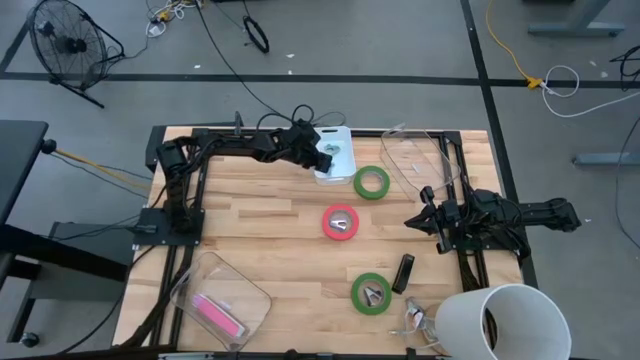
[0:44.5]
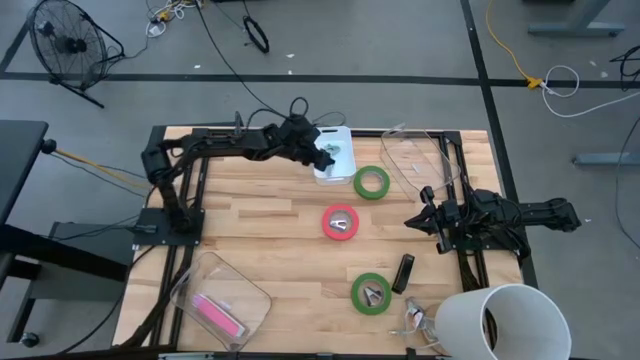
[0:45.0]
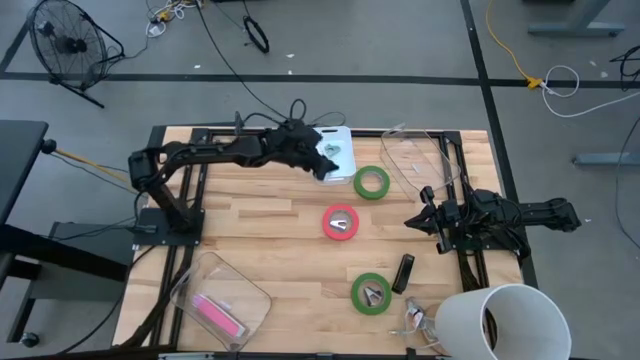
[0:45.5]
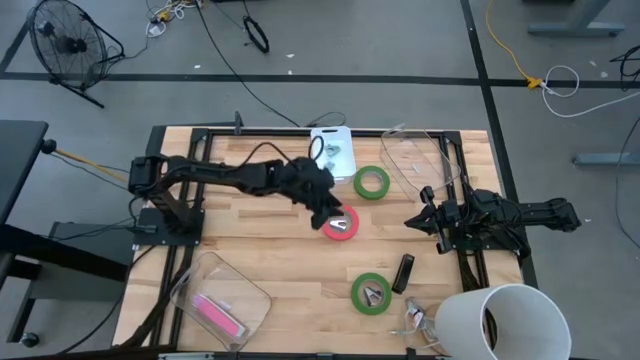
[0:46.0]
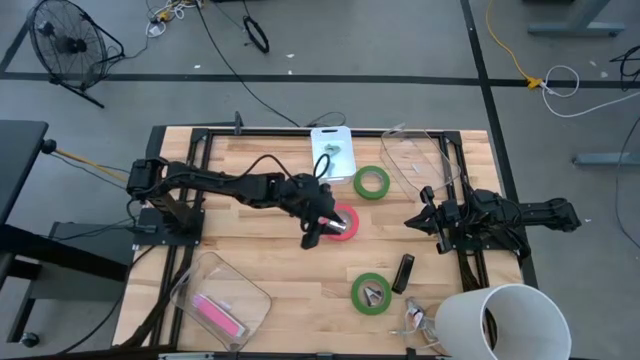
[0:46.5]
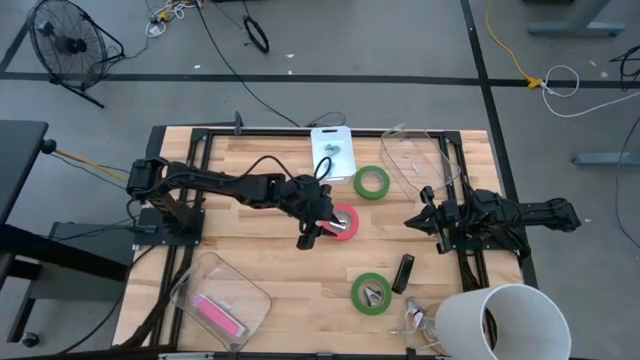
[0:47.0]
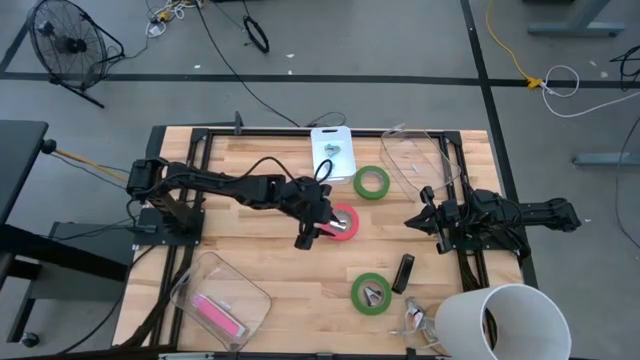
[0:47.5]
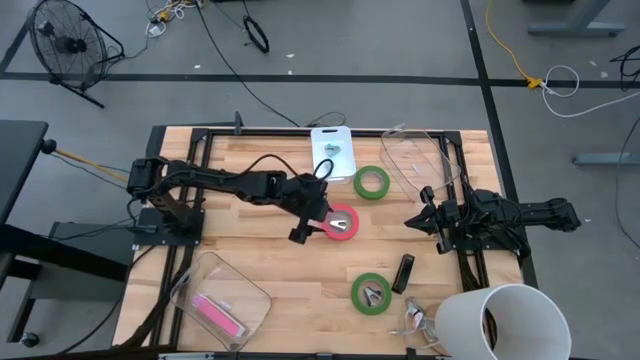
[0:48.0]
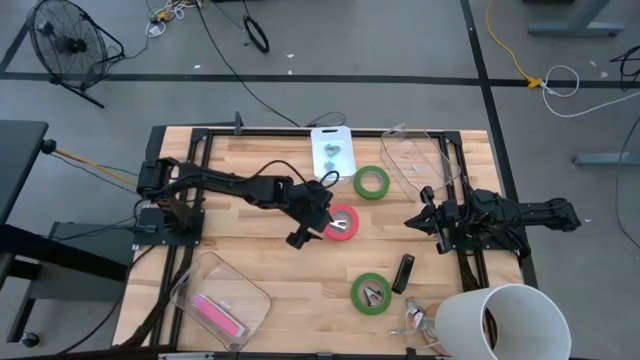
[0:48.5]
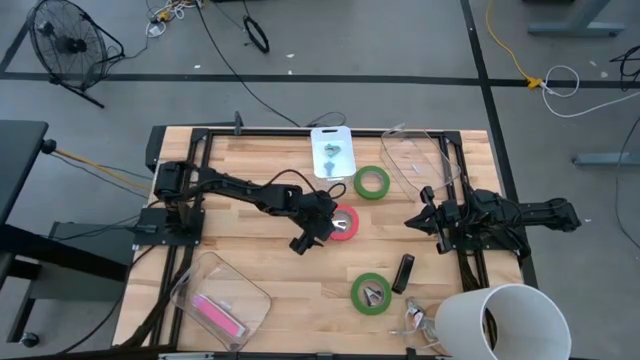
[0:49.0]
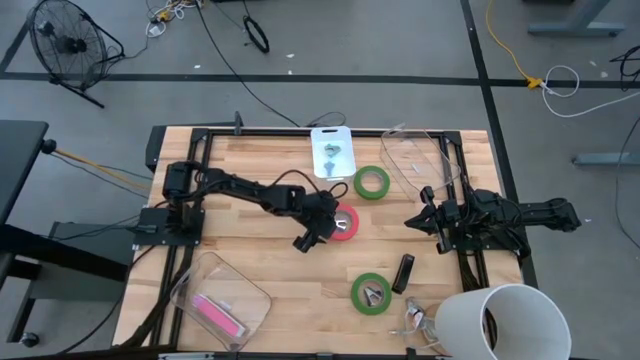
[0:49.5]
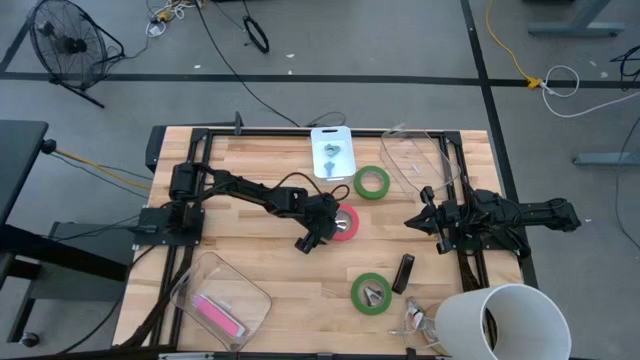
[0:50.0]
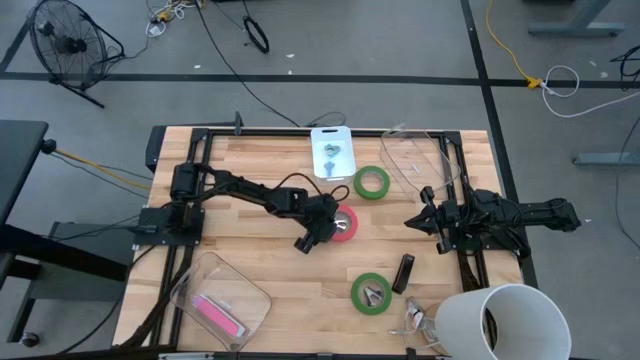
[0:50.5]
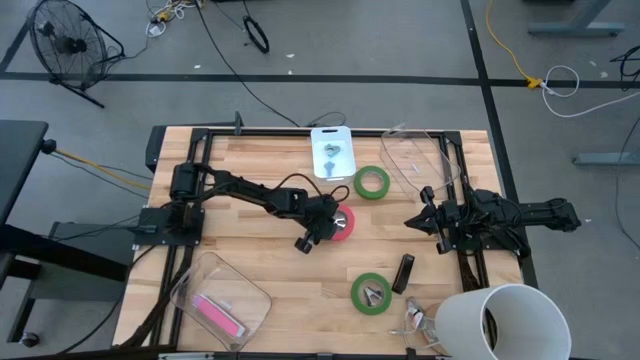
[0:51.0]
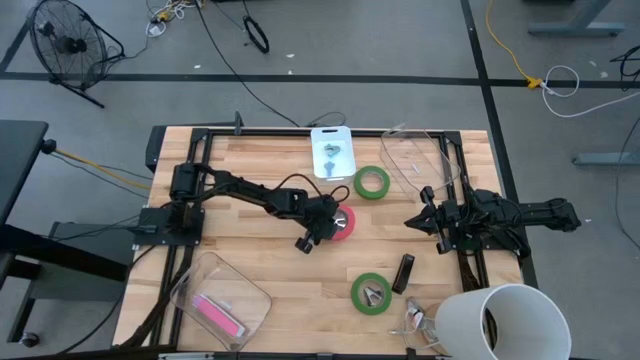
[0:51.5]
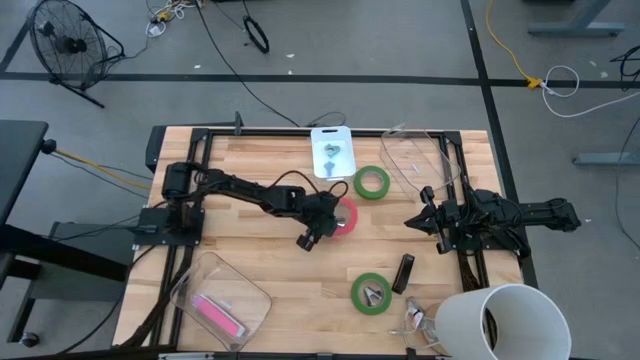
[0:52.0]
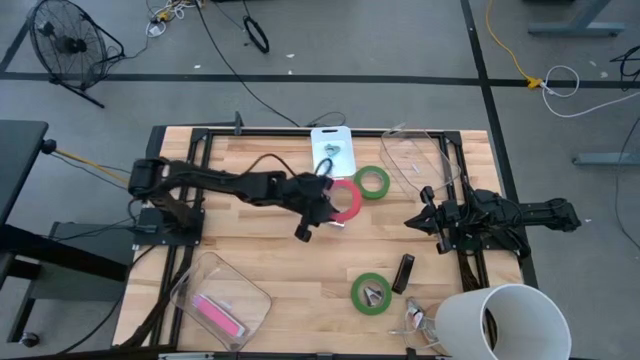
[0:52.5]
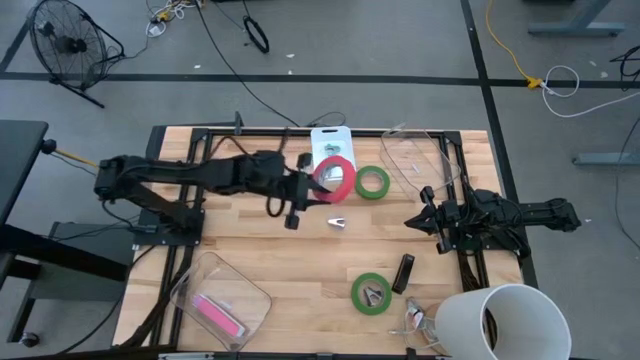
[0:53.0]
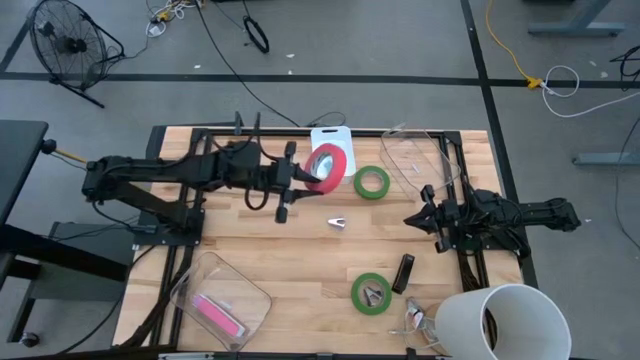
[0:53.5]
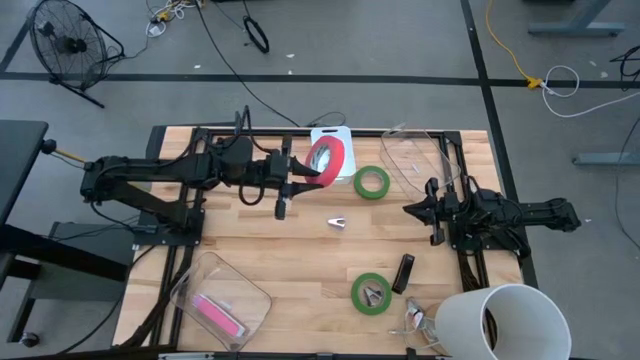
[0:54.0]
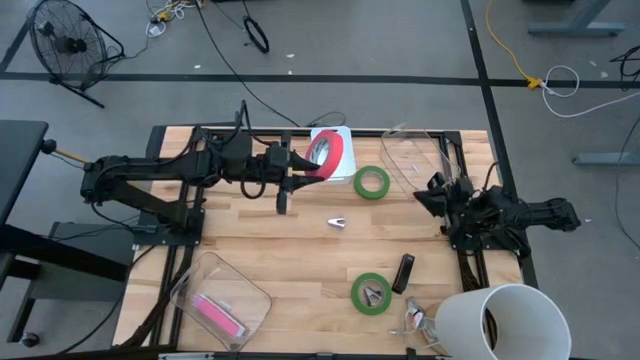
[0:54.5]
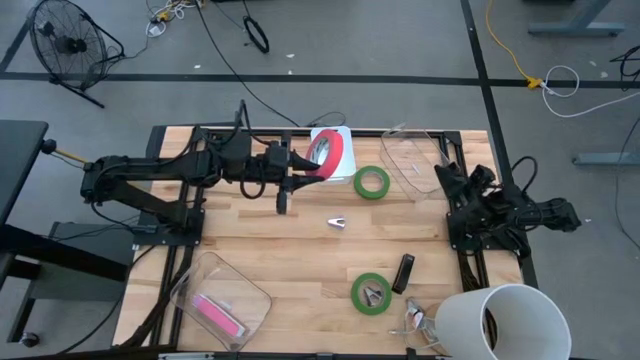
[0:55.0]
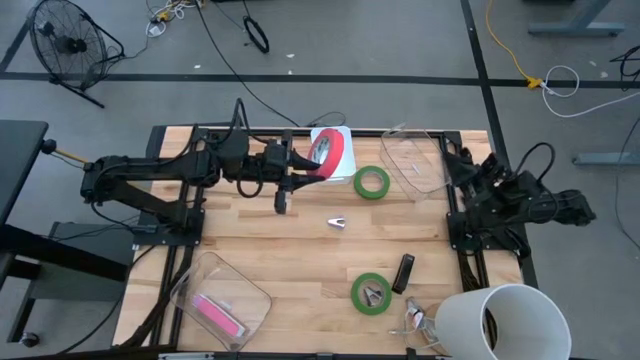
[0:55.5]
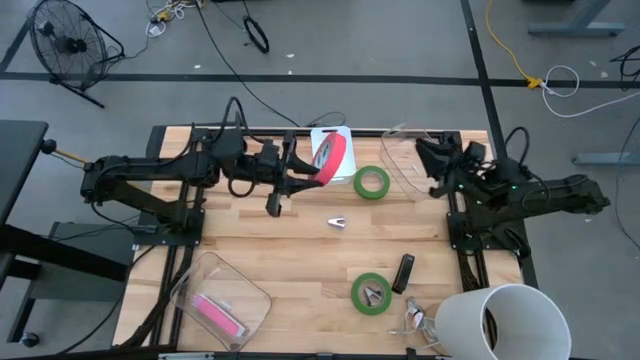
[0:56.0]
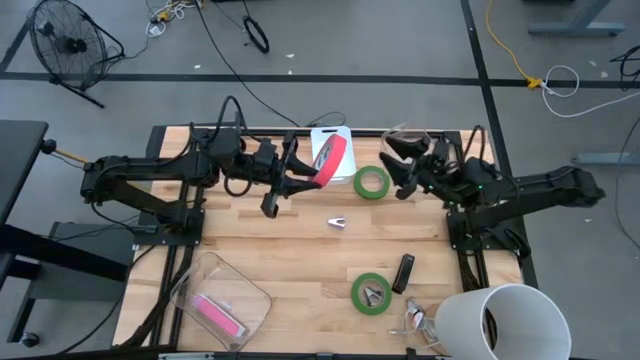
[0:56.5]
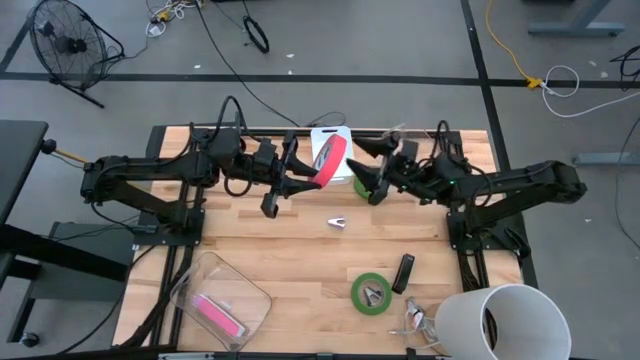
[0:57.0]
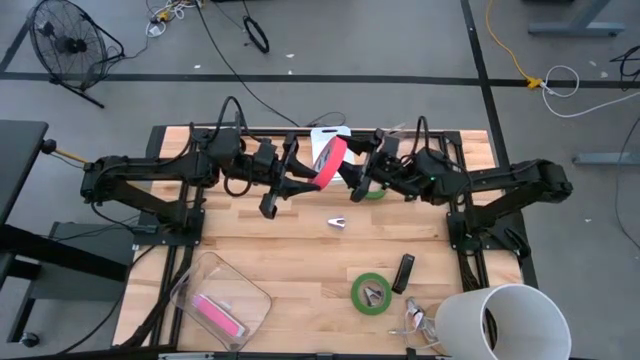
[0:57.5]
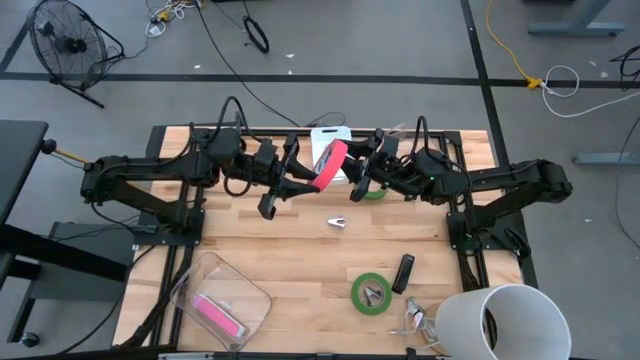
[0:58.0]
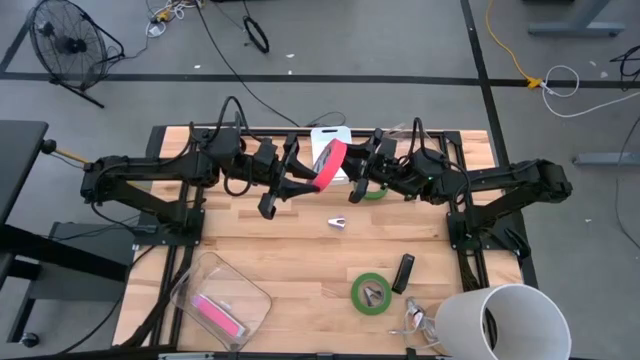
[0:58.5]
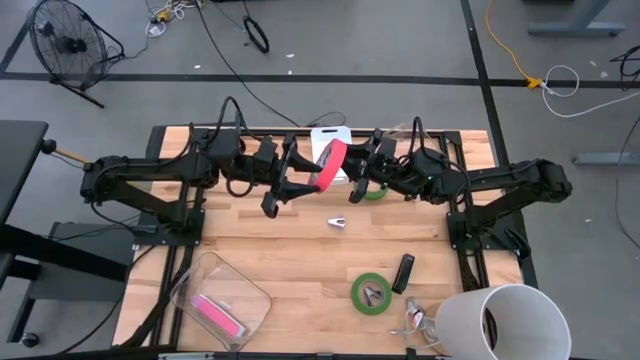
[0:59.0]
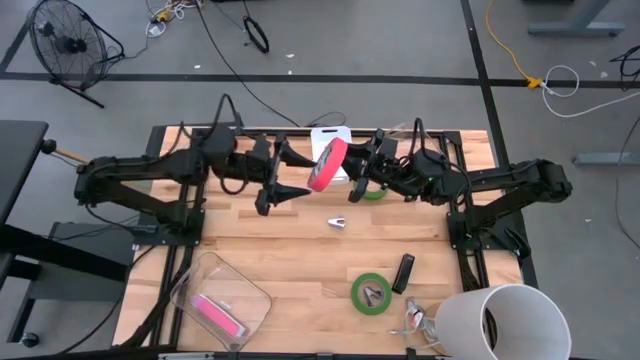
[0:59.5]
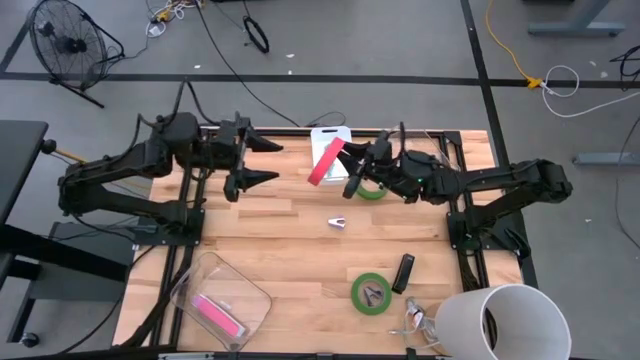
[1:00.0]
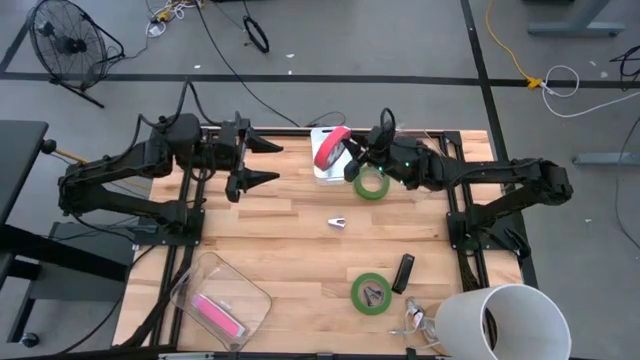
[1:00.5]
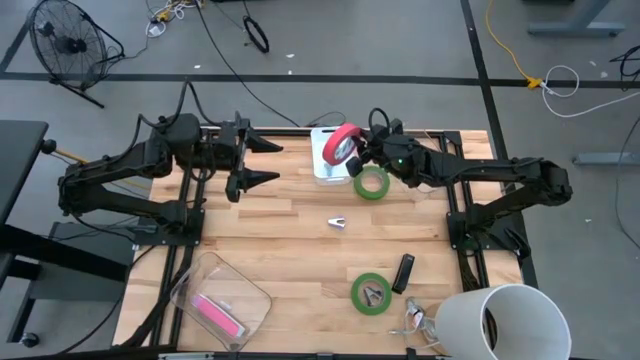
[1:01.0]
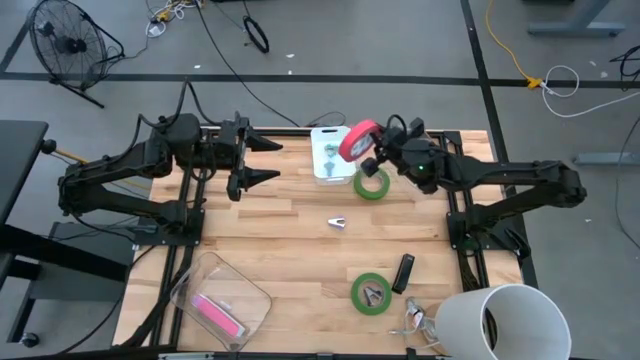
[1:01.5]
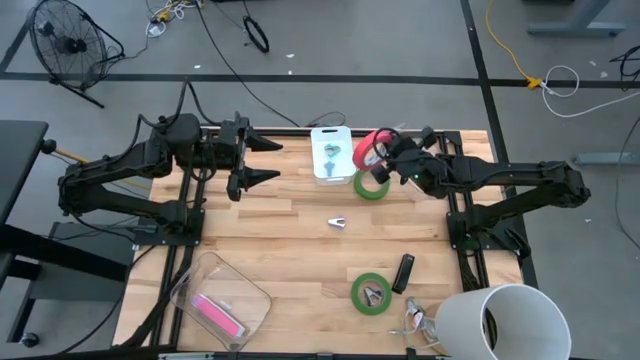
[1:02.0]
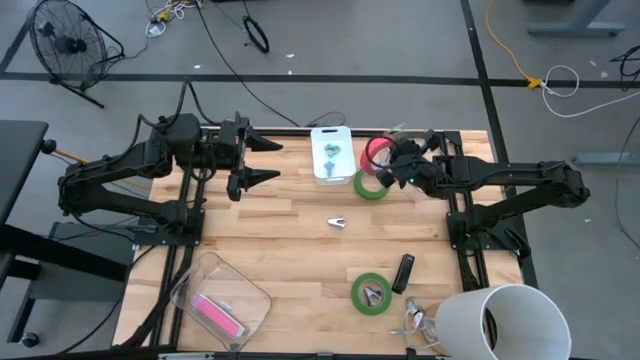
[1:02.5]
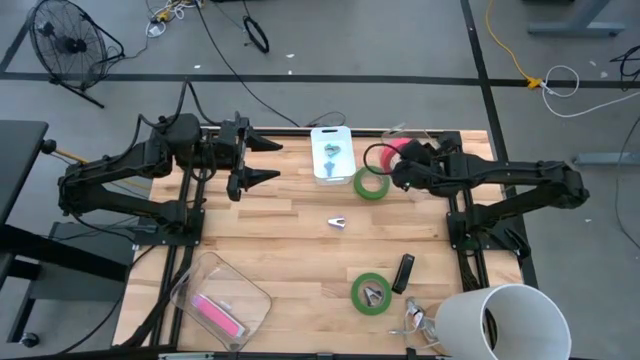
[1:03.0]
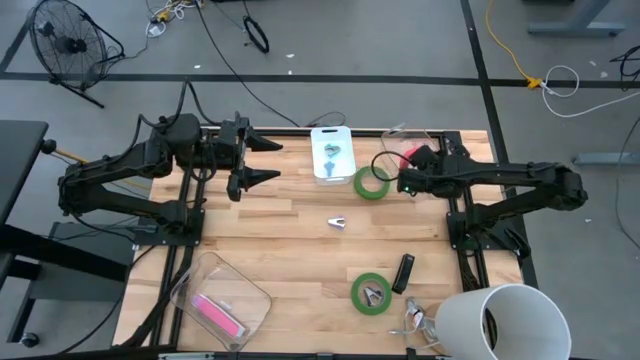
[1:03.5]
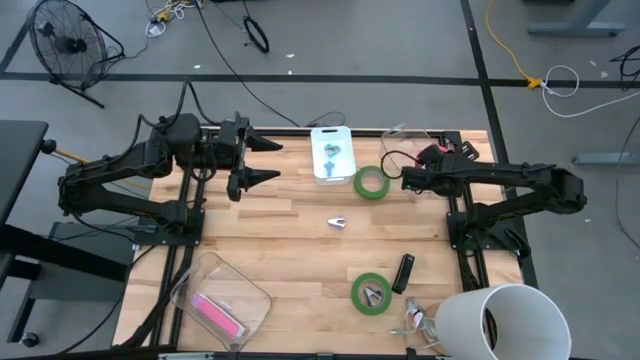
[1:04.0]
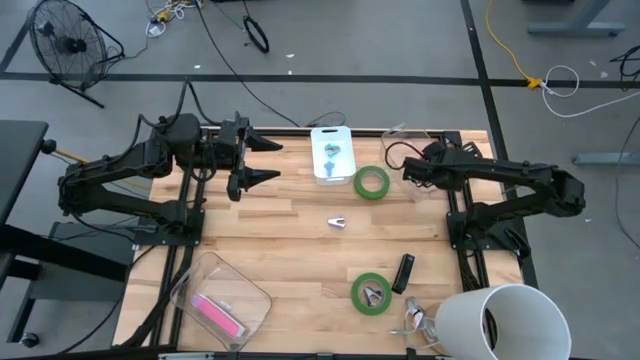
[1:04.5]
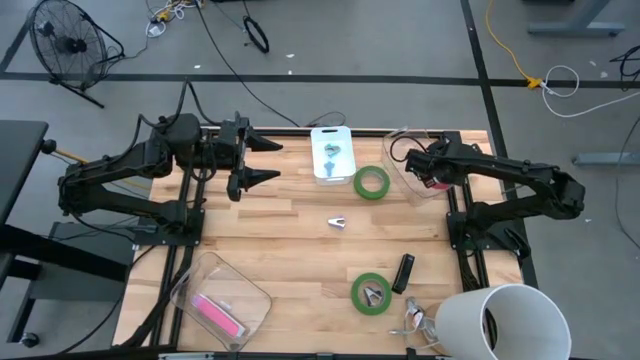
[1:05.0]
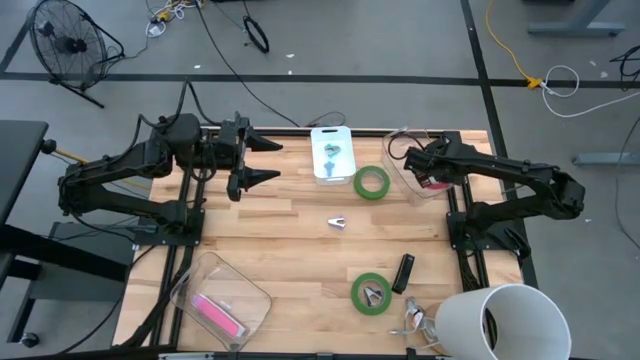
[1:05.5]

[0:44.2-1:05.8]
Task: Pick and place Stapler, Stapler remover, tape
Put the pink tape into the top transparent bin
